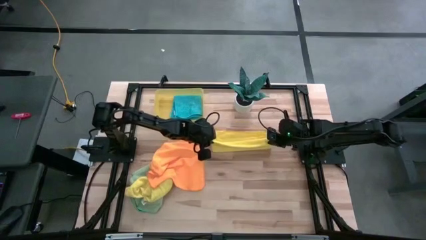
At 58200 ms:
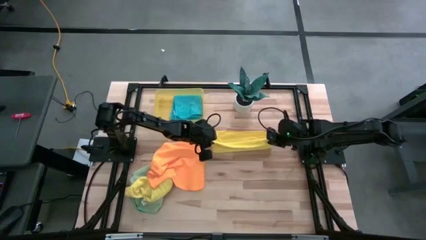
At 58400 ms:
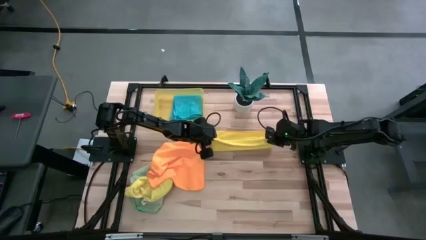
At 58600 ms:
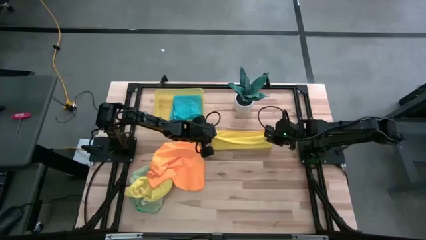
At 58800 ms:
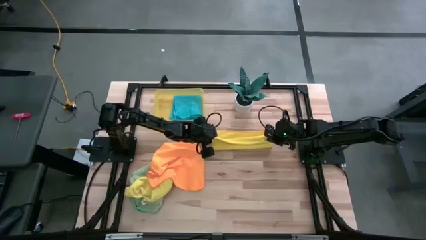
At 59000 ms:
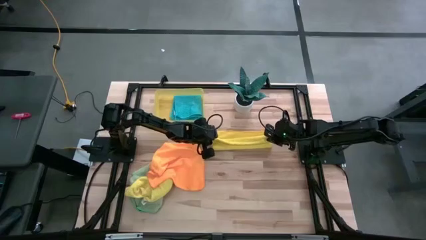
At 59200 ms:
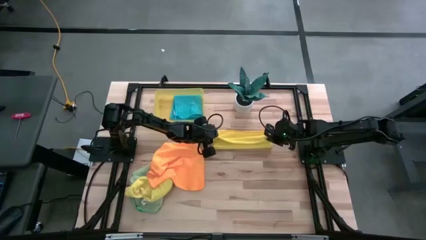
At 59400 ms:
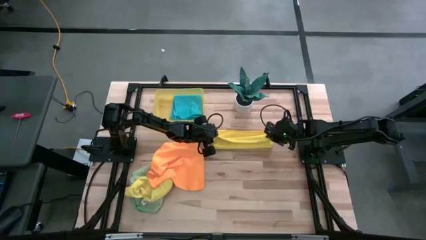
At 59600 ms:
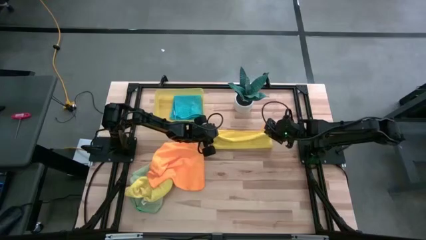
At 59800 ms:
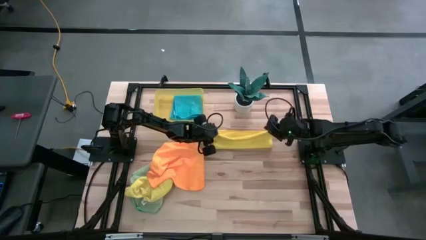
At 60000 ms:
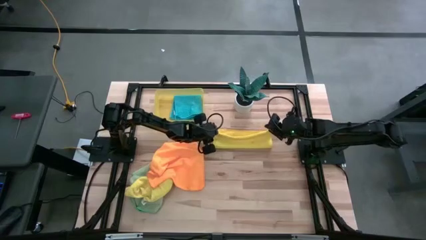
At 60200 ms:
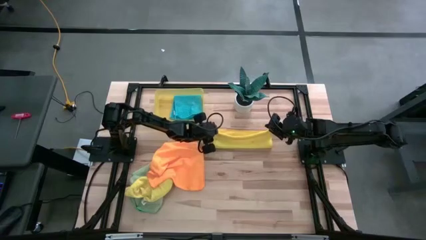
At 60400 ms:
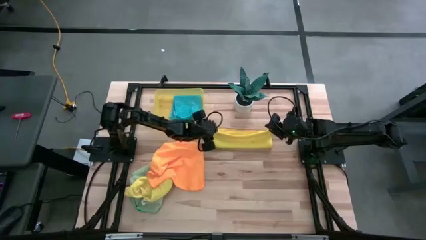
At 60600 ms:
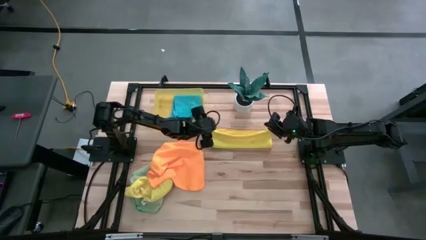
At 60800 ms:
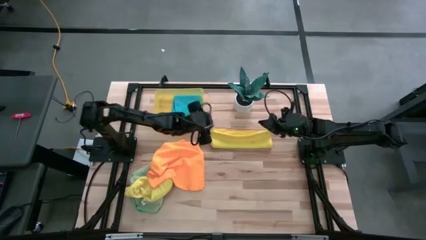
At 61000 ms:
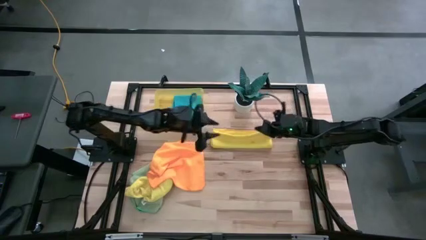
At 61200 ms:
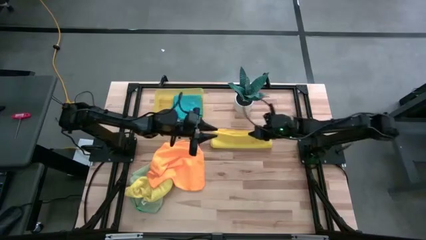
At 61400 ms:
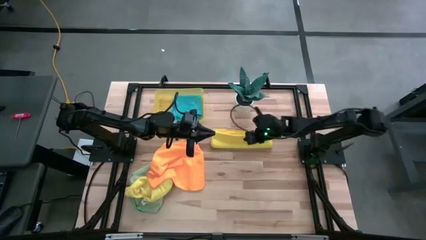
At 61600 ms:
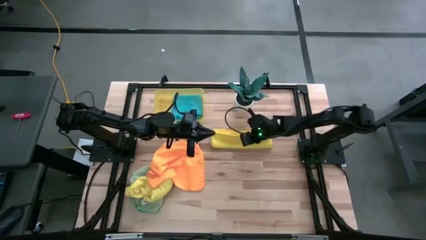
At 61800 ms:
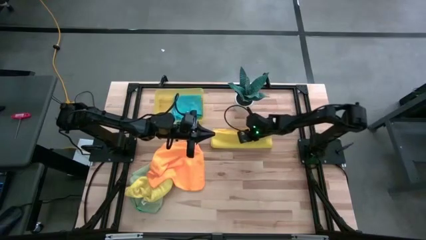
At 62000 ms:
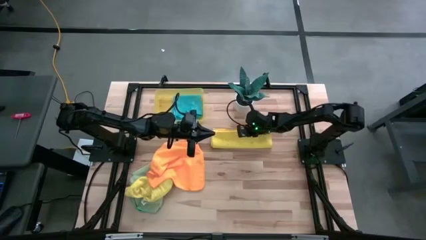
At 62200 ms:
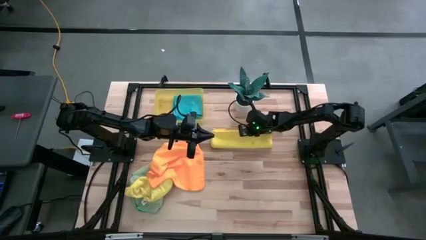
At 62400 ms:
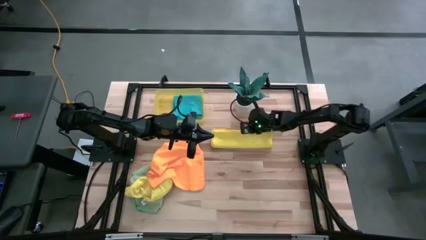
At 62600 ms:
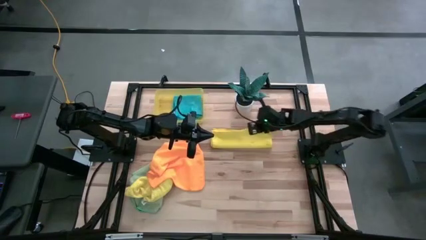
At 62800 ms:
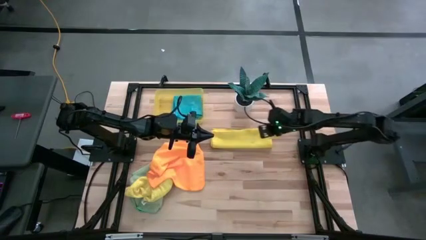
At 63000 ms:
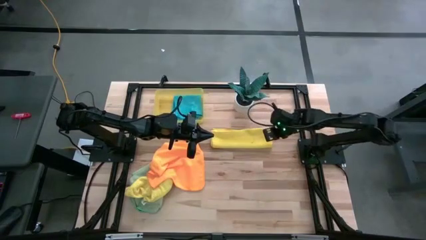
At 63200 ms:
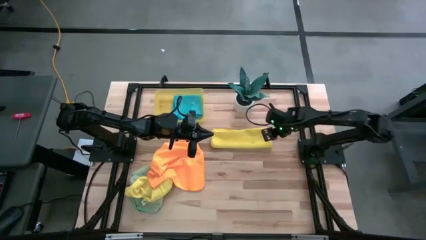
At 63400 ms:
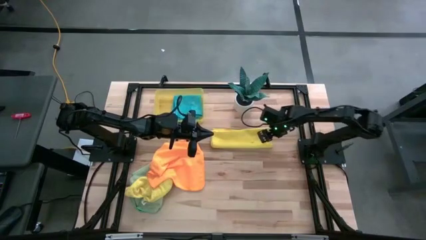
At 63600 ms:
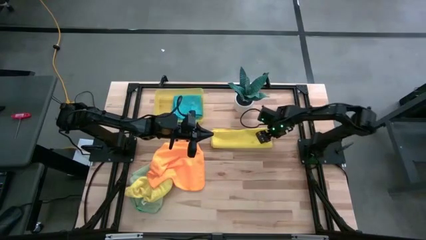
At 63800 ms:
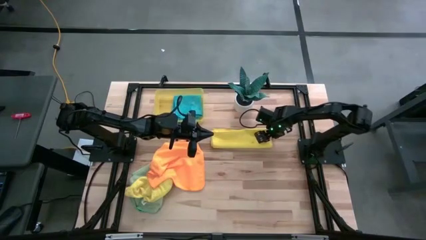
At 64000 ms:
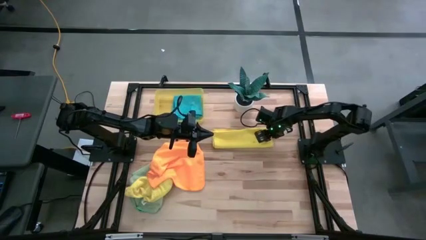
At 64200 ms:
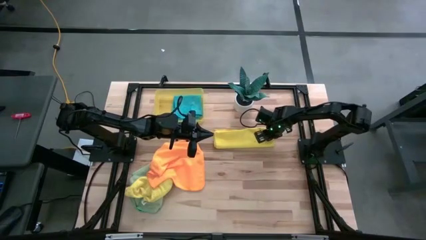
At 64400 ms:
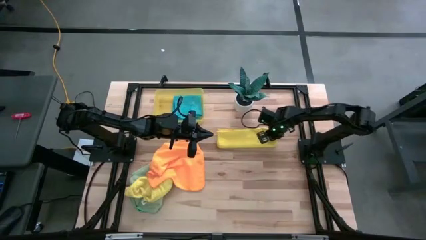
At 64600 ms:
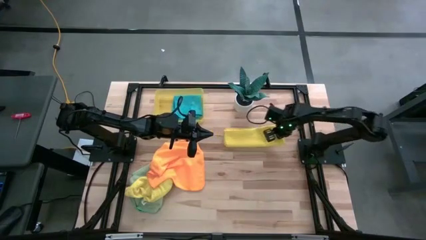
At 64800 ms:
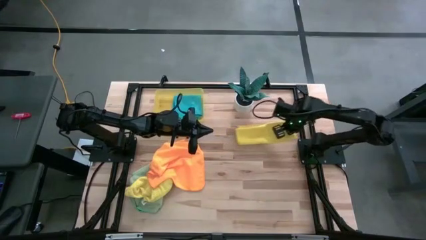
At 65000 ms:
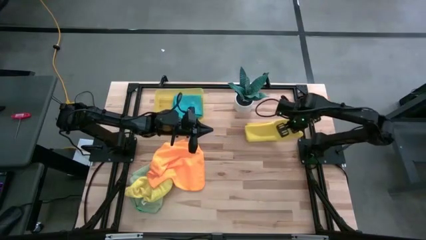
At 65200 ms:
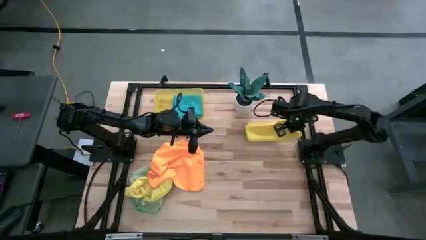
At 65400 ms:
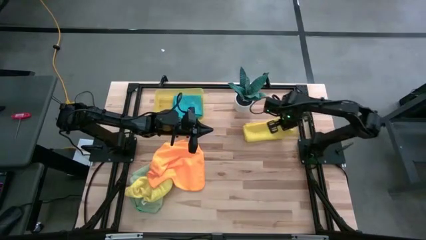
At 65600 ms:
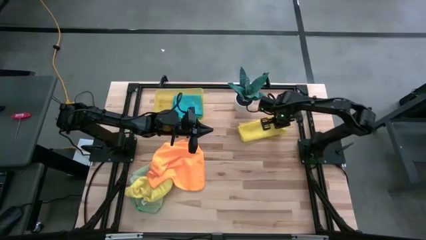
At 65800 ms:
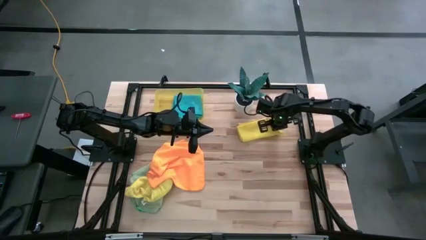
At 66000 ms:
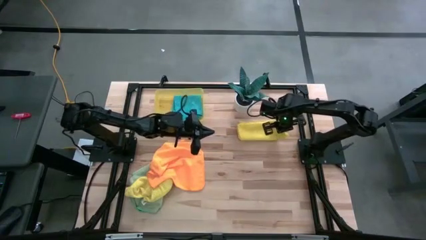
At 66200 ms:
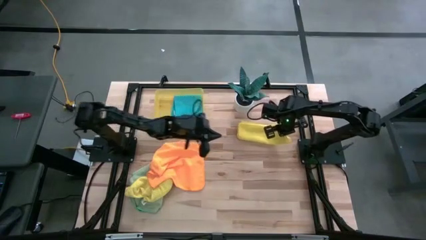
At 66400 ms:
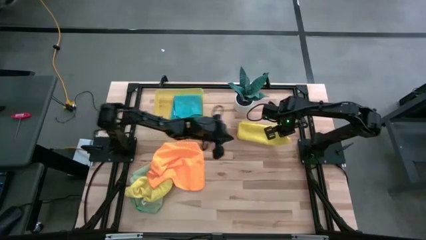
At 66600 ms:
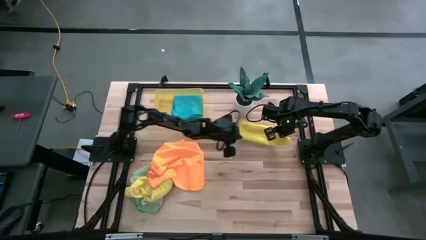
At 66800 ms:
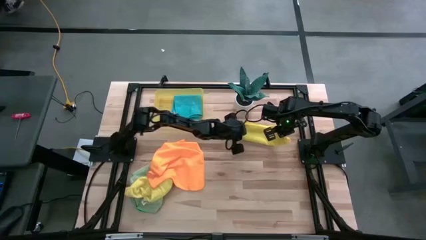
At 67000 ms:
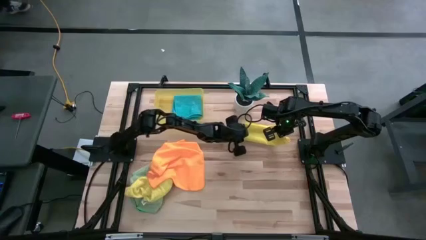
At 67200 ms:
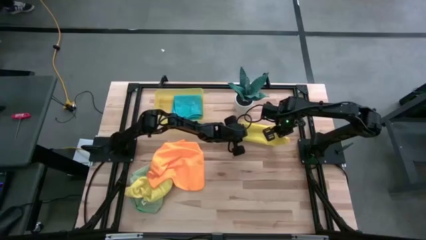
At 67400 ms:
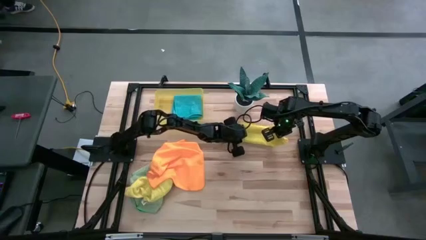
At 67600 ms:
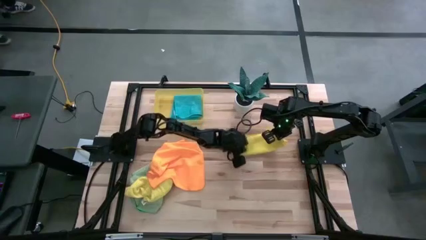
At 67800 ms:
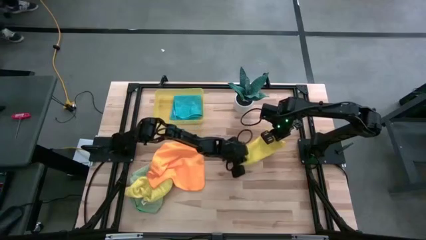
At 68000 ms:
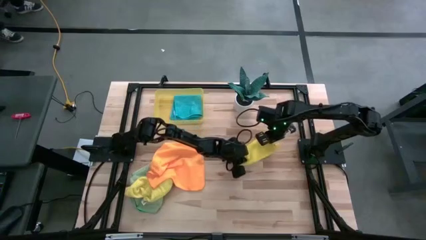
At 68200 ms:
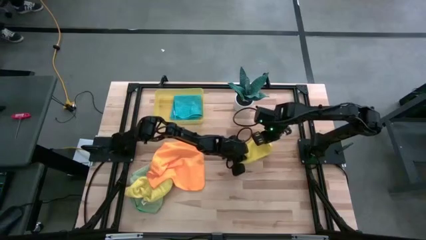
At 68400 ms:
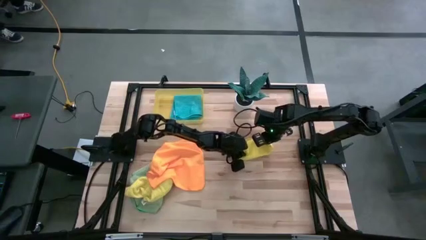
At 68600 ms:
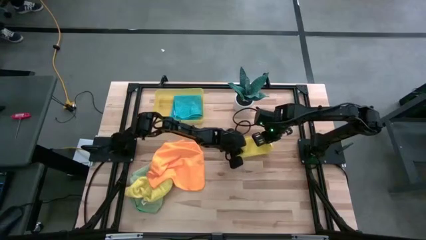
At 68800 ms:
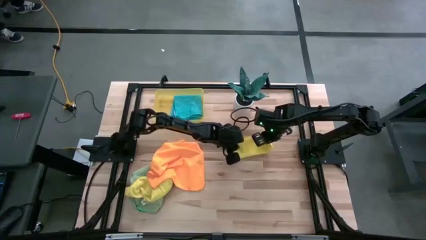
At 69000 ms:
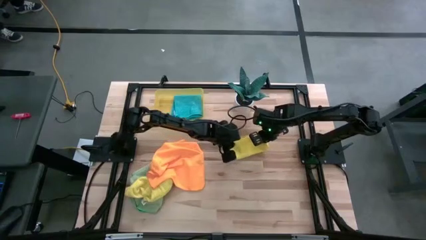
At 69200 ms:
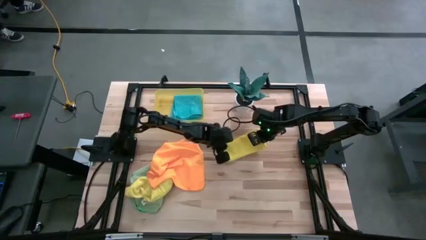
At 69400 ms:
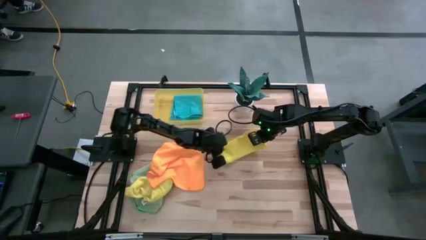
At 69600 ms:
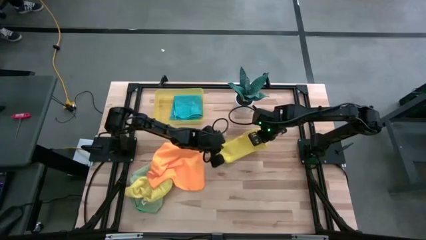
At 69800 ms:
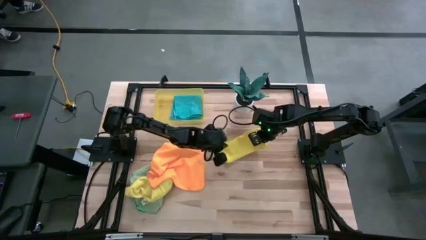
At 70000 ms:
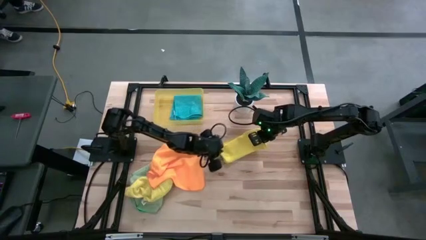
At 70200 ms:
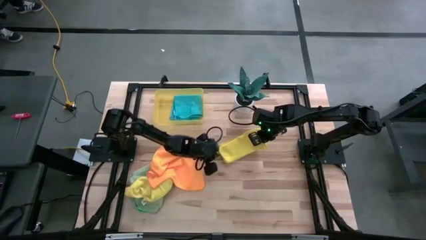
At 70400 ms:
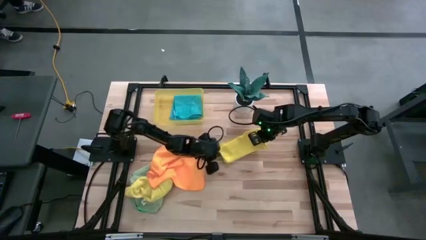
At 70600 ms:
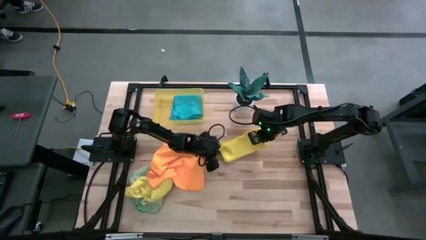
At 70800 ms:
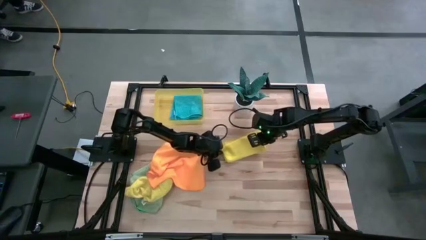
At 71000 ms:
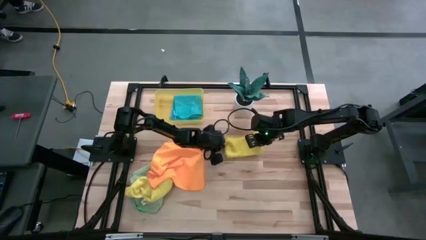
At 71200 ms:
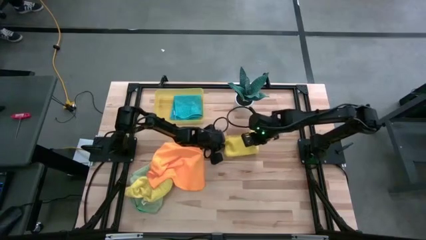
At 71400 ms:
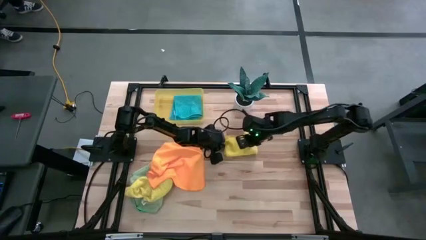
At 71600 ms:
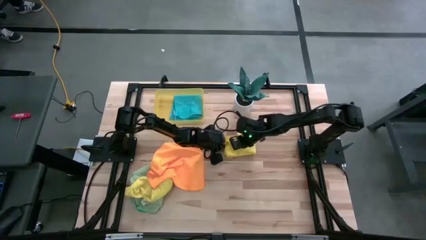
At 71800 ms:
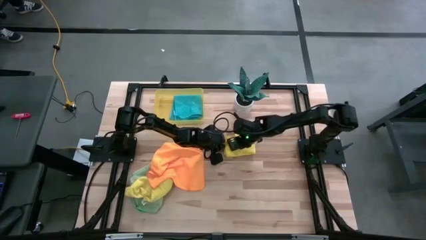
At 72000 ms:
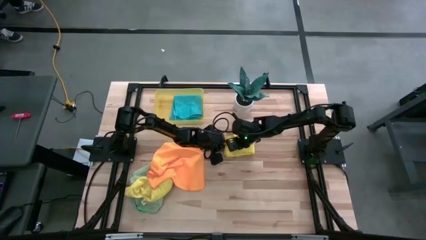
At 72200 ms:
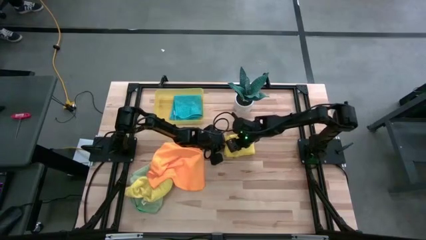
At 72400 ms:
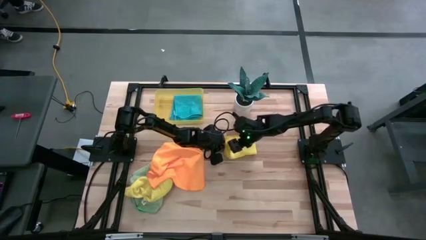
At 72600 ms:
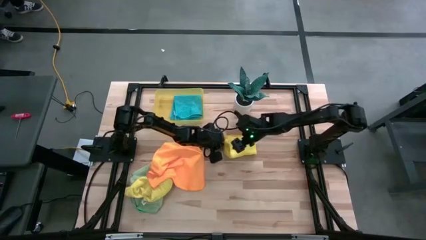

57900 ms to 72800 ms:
Task: Fold microfiber towels
Fold the right yellow microfiber cloth
